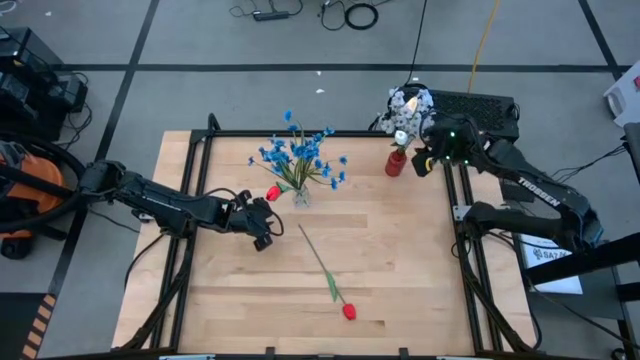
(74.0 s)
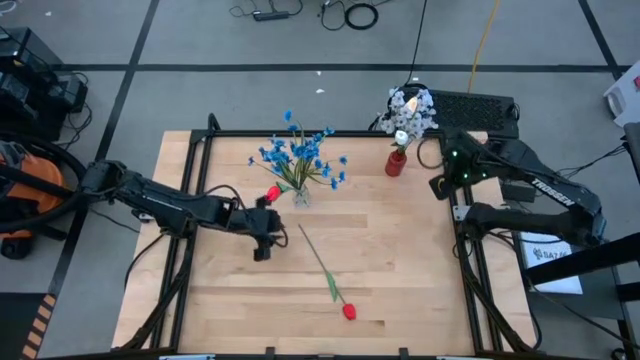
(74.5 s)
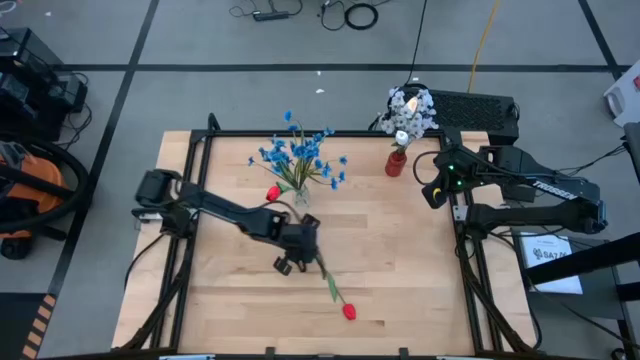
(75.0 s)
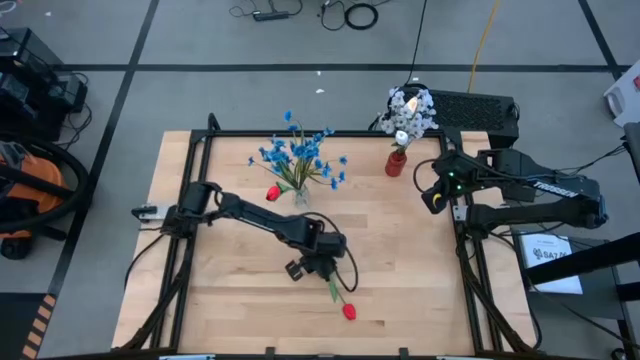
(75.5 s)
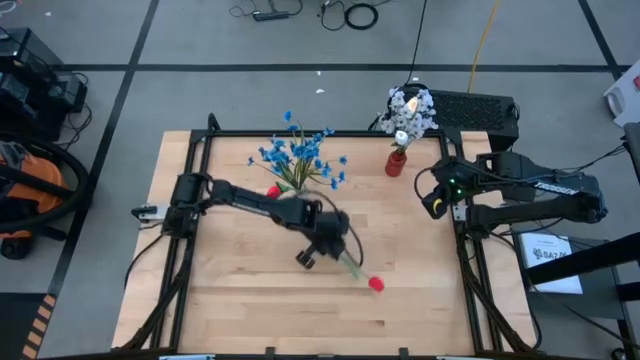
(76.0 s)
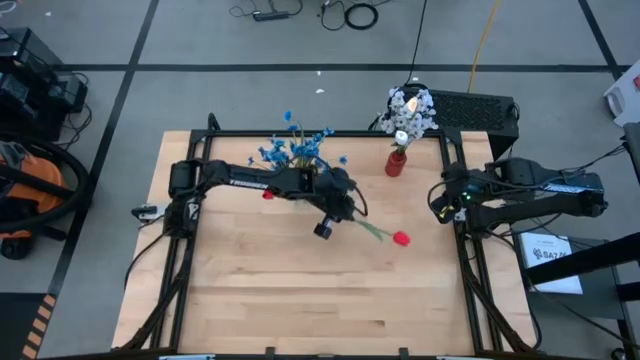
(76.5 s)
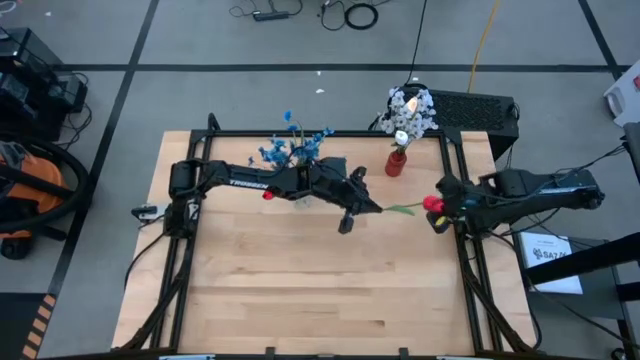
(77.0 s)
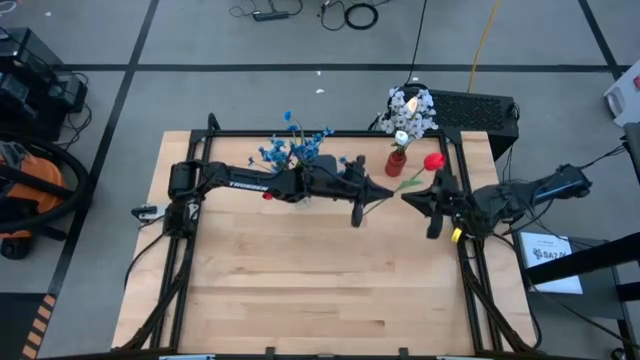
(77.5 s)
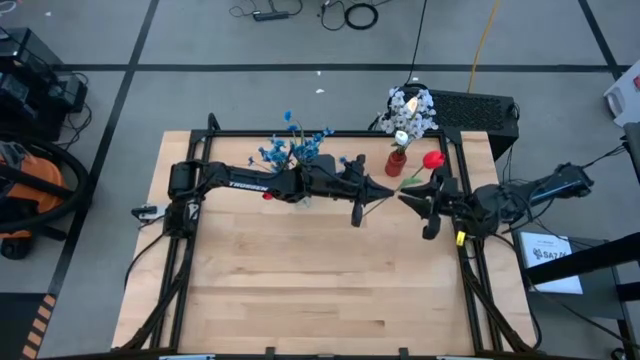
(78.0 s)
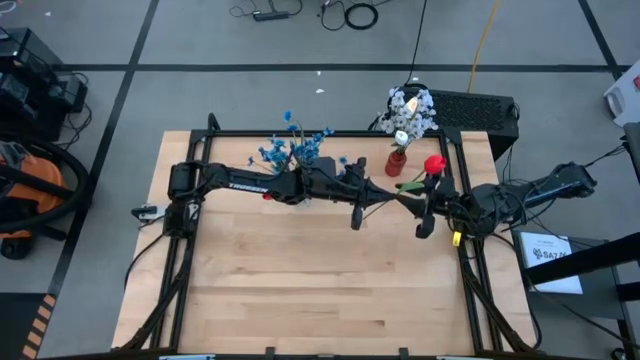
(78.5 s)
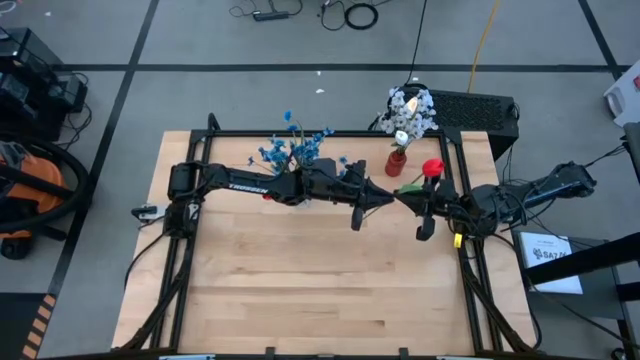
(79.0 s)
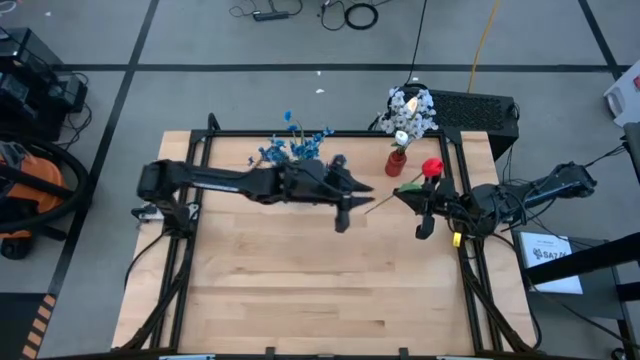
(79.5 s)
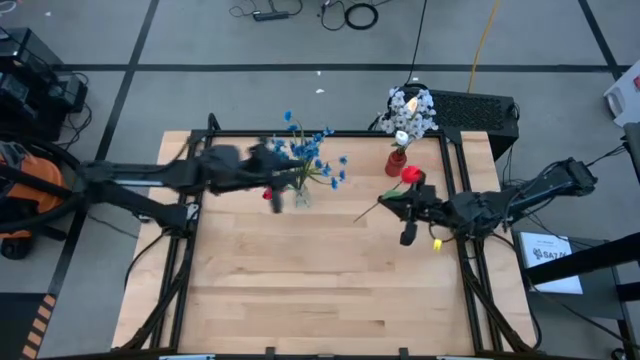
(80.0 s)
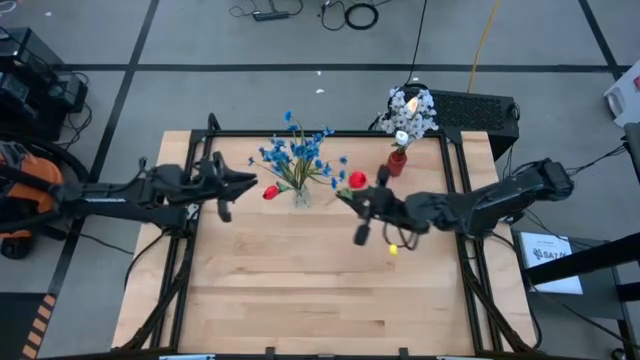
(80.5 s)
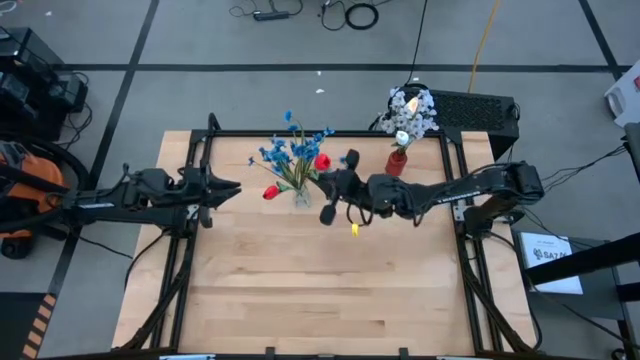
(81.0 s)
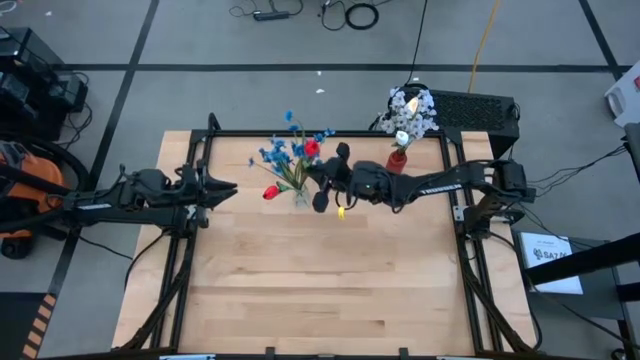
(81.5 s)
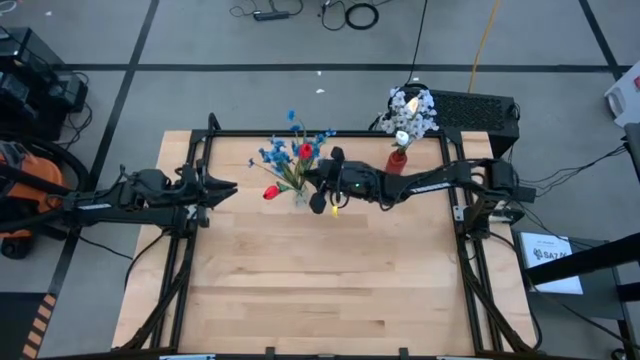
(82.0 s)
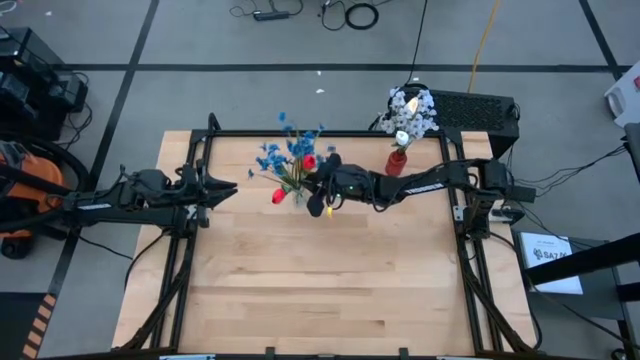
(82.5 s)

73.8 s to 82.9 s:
Task: Sort flowers into vase by color
Put the red flower into the transparent vase

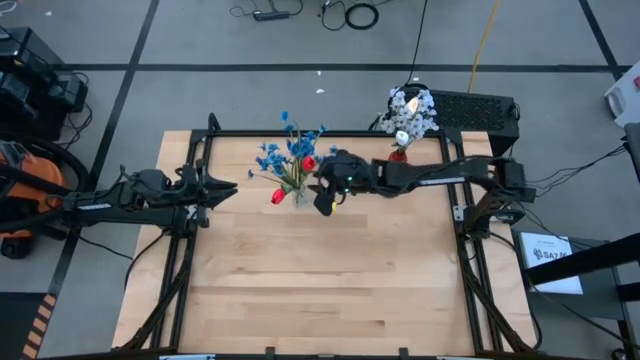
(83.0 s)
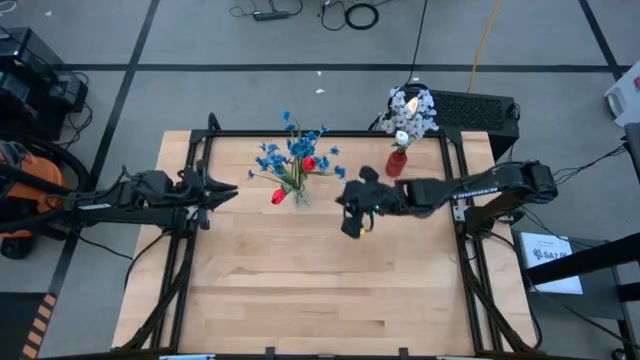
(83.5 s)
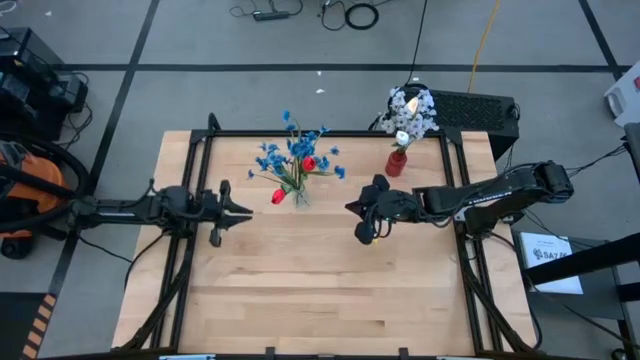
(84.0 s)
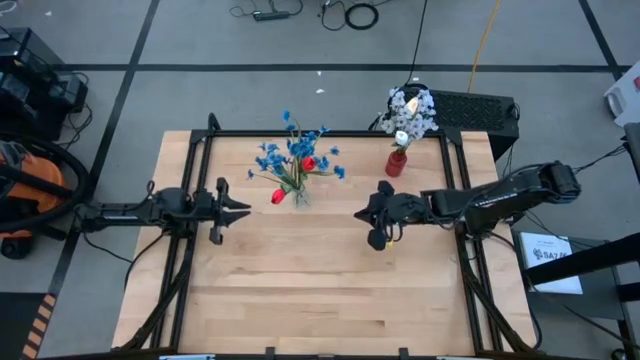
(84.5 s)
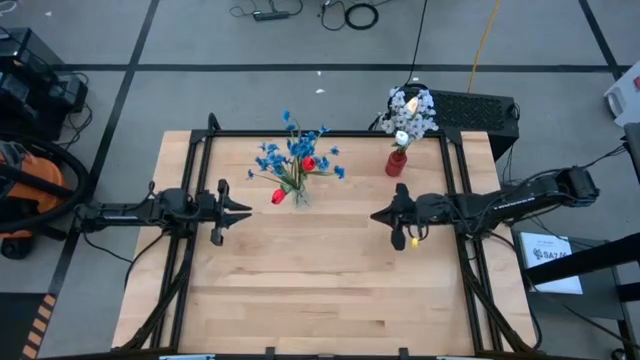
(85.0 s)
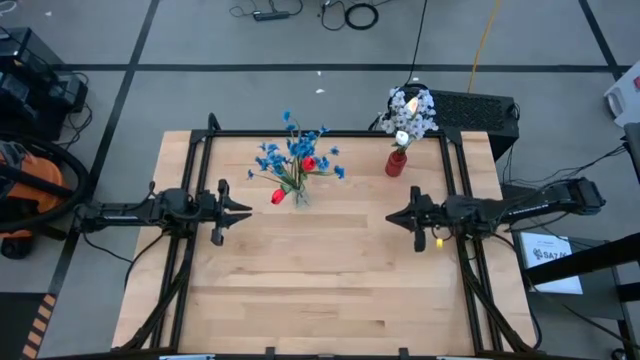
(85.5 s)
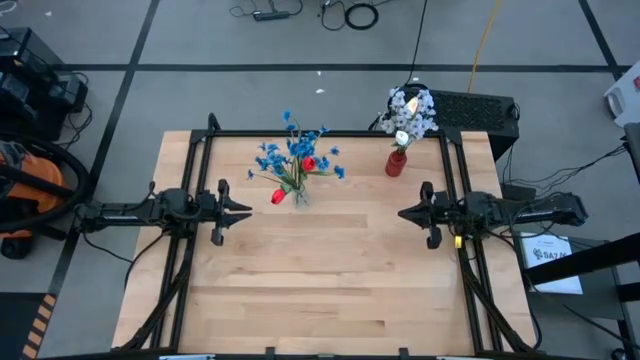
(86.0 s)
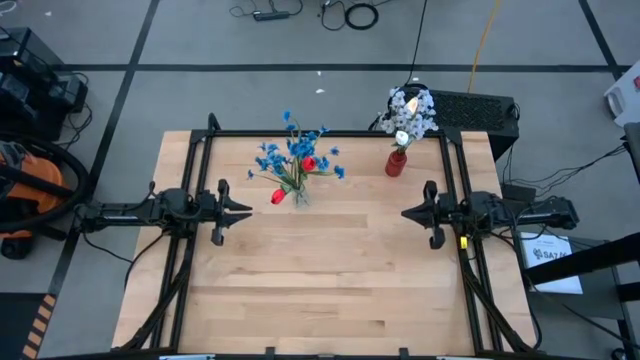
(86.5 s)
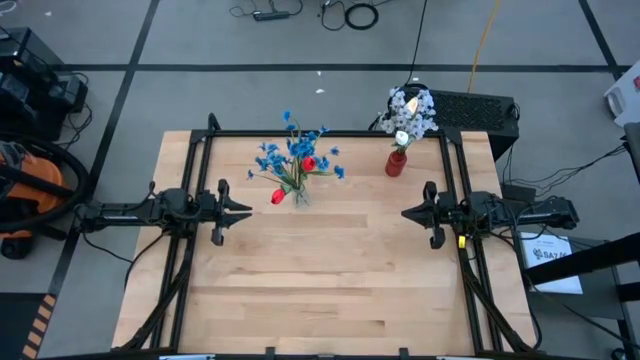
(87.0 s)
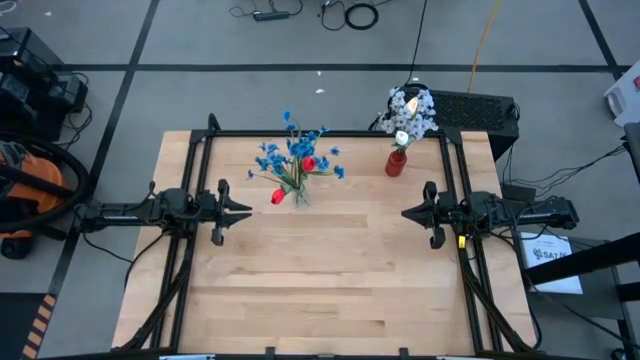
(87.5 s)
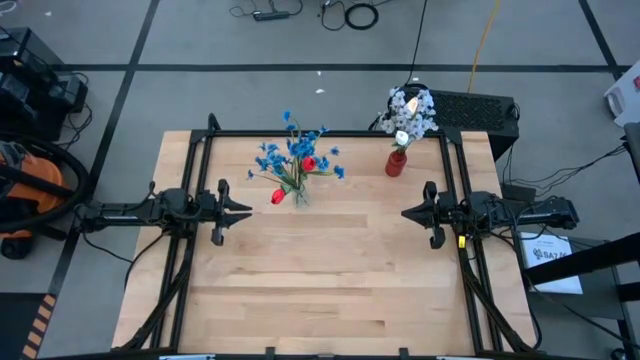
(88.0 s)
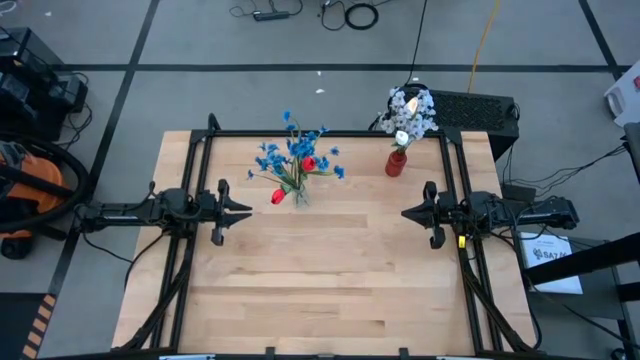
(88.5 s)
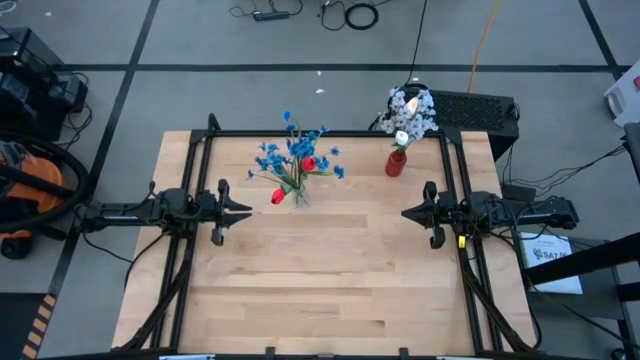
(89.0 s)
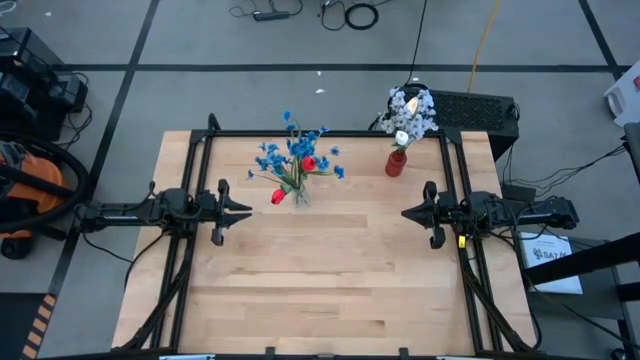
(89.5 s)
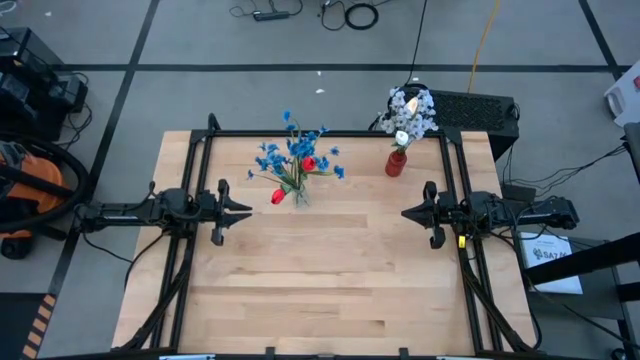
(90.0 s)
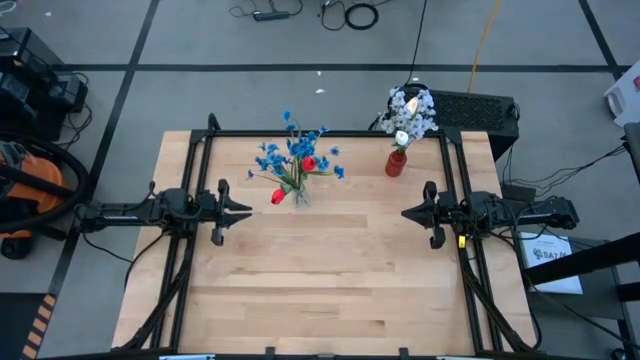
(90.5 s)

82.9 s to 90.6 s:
Return to Home Position

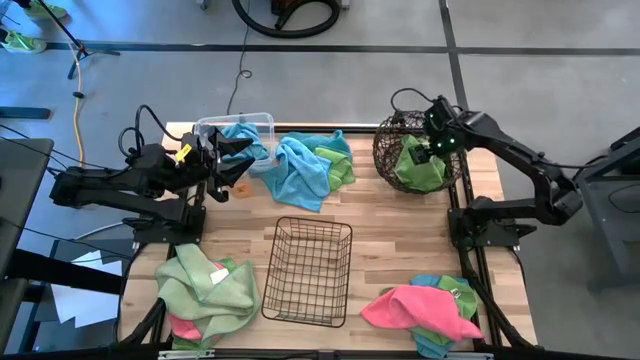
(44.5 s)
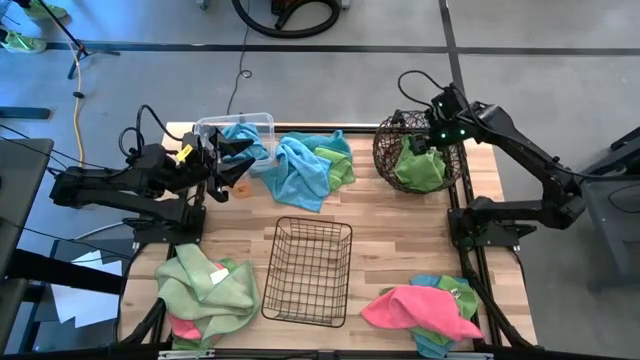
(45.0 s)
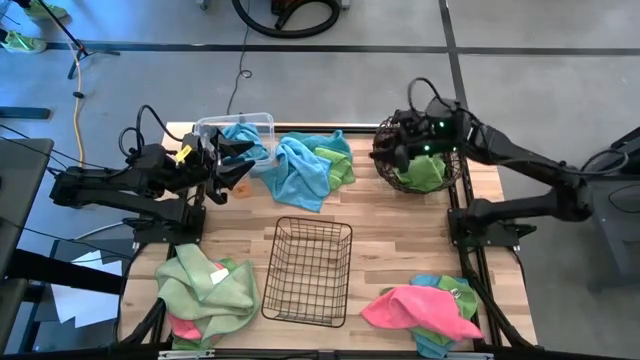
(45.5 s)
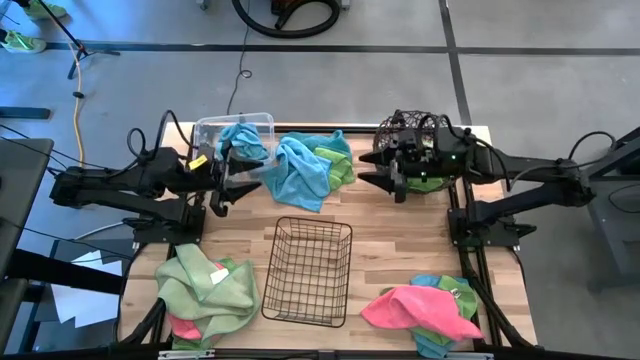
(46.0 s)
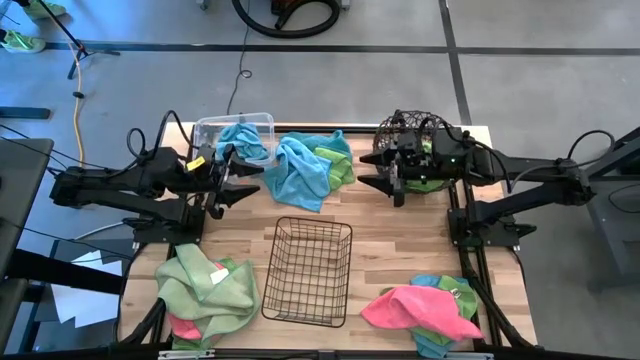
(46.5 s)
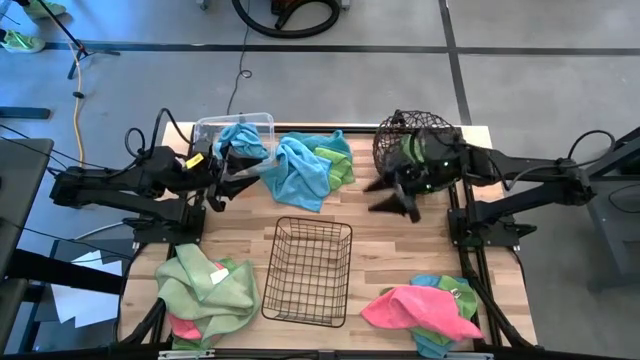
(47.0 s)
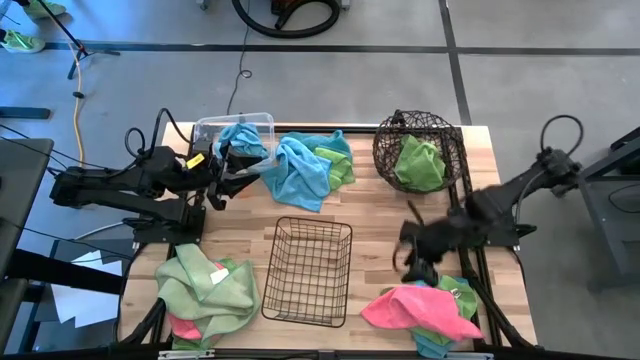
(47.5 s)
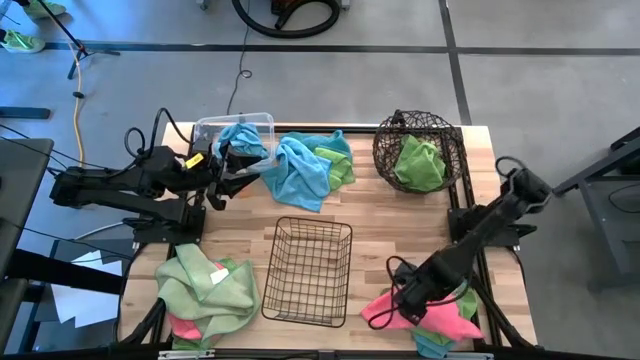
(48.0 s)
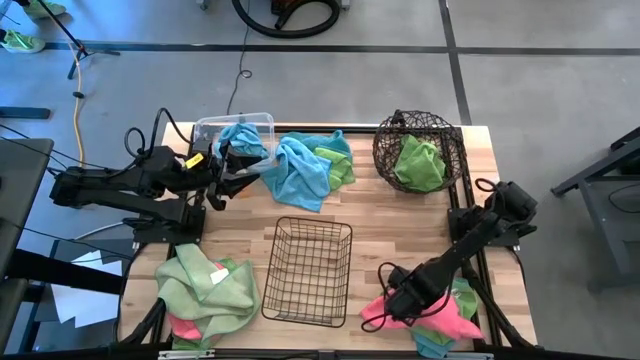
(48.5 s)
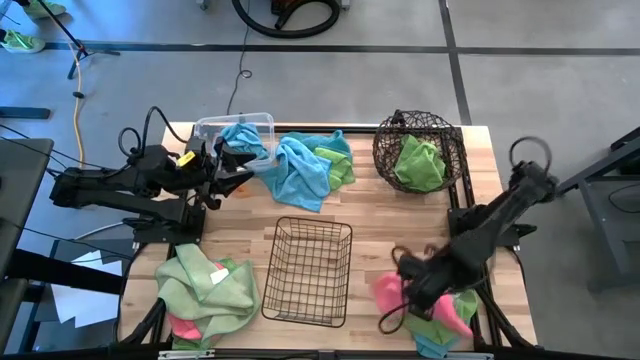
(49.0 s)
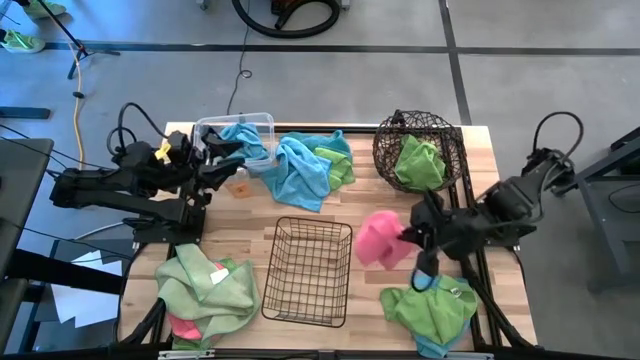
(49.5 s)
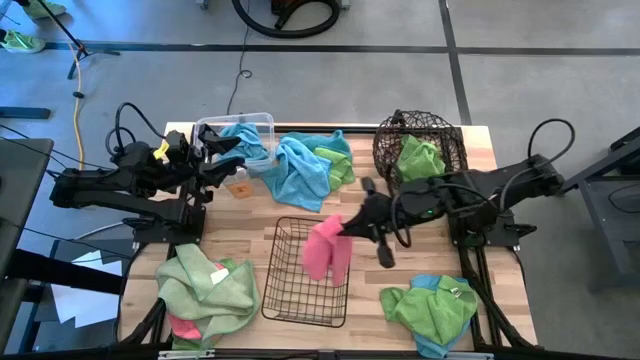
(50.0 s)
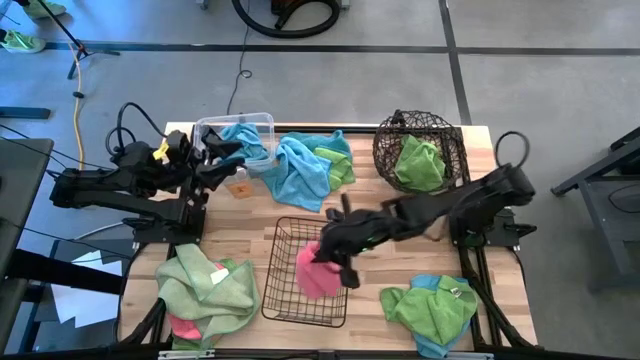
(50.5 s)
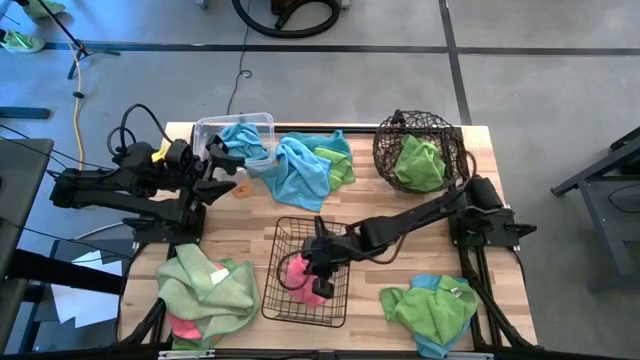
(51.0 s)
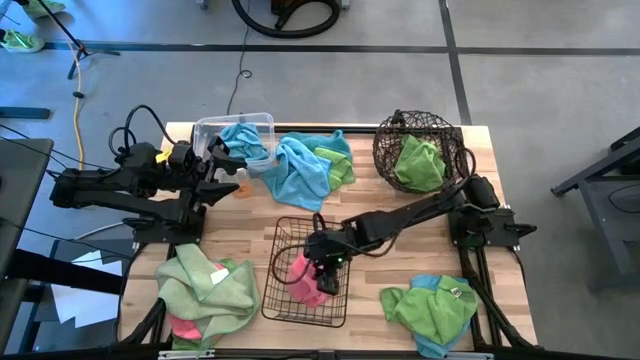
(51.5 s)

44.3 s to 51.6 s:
Task: Sort microfiber towel by color & place in baskets
Put the pink microfiber towel into the black wire basket
